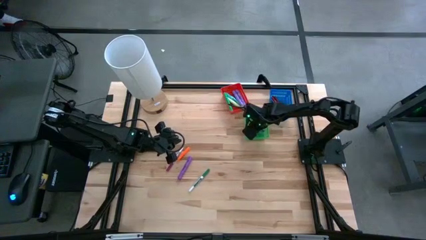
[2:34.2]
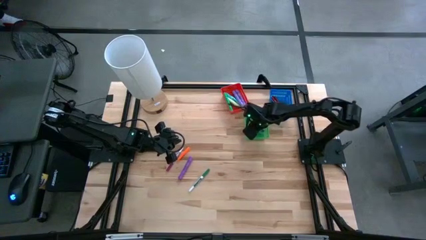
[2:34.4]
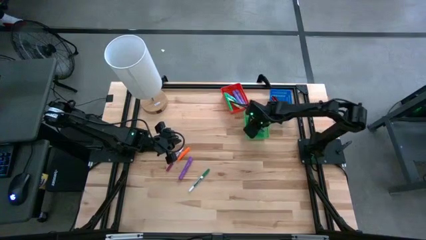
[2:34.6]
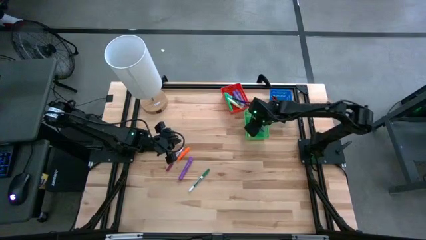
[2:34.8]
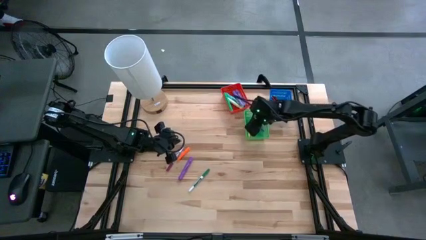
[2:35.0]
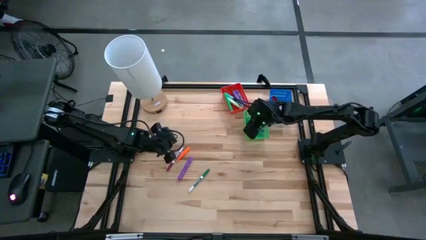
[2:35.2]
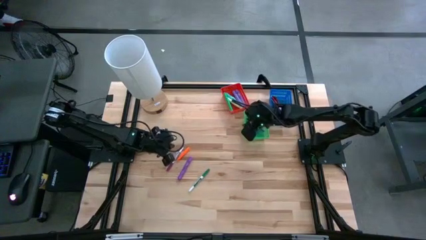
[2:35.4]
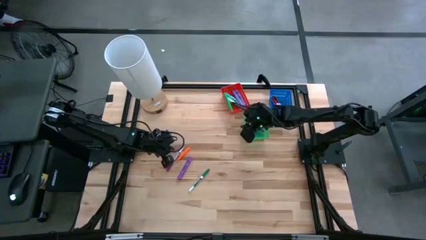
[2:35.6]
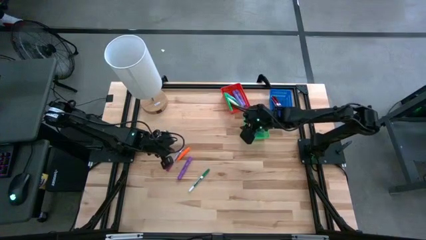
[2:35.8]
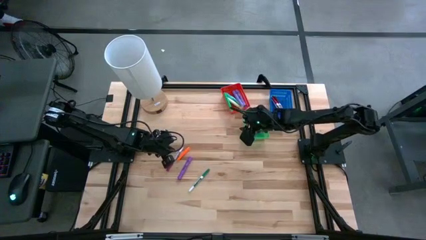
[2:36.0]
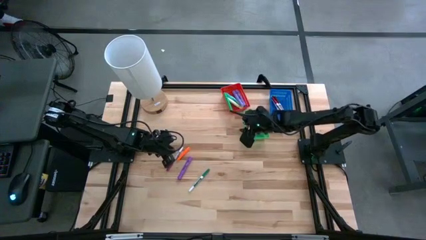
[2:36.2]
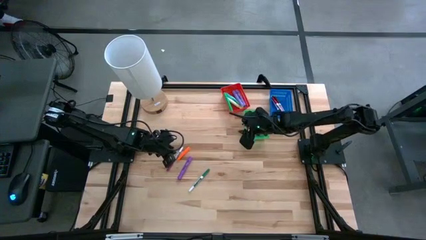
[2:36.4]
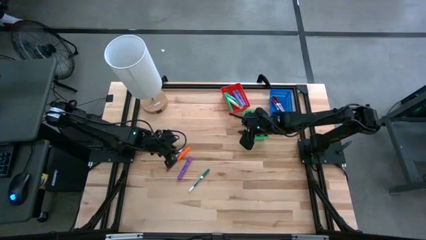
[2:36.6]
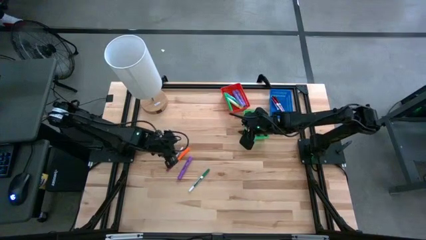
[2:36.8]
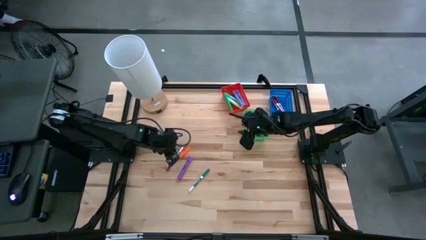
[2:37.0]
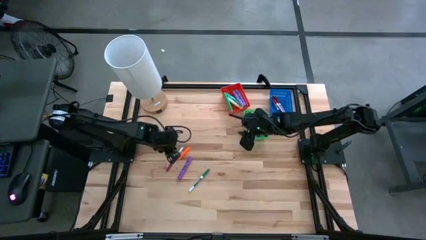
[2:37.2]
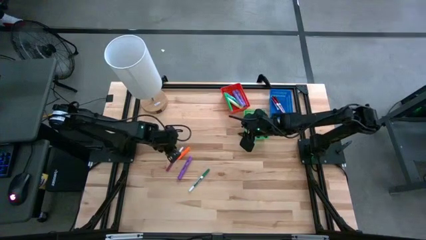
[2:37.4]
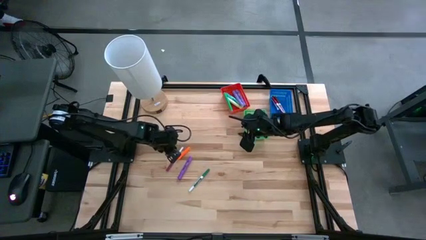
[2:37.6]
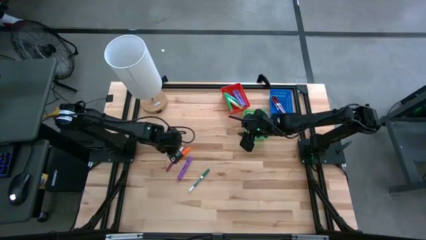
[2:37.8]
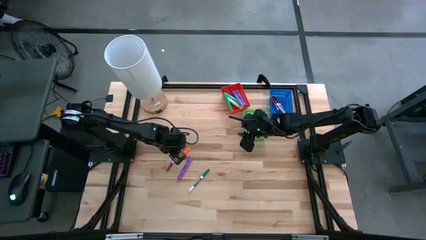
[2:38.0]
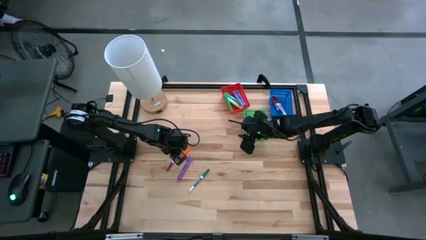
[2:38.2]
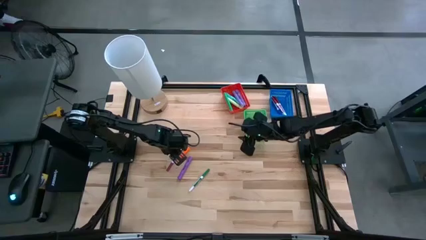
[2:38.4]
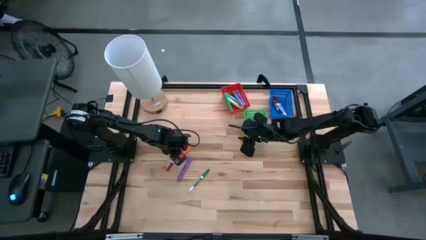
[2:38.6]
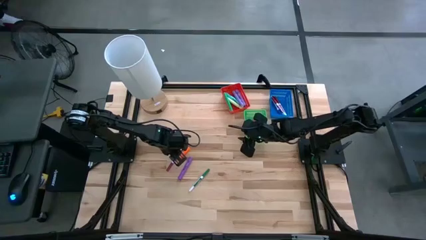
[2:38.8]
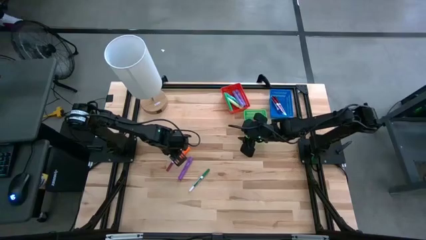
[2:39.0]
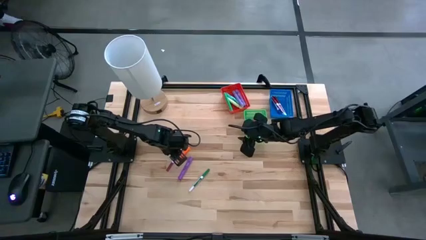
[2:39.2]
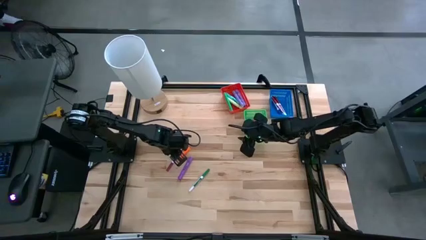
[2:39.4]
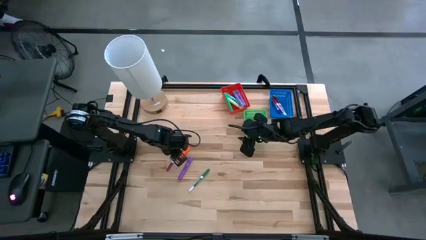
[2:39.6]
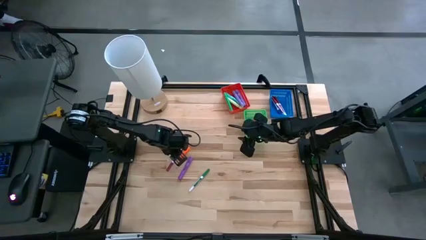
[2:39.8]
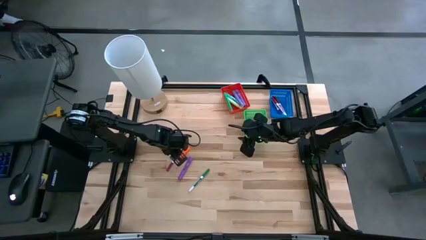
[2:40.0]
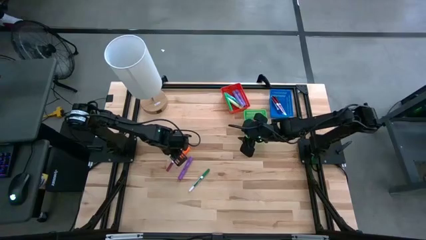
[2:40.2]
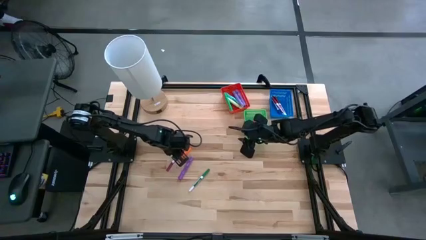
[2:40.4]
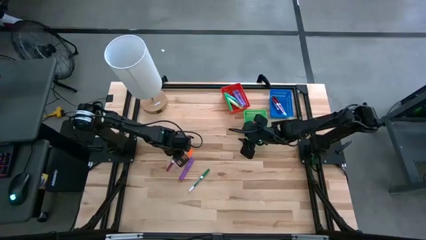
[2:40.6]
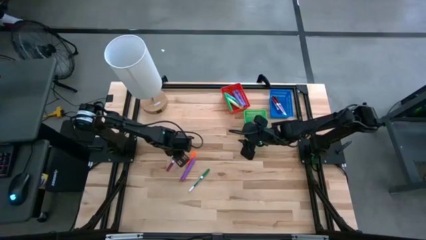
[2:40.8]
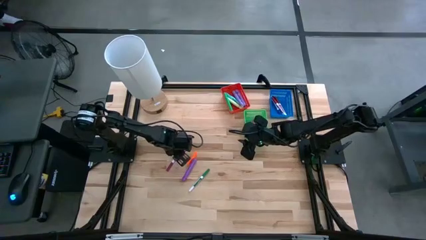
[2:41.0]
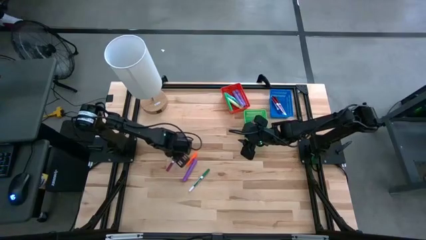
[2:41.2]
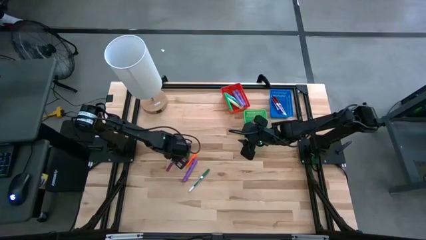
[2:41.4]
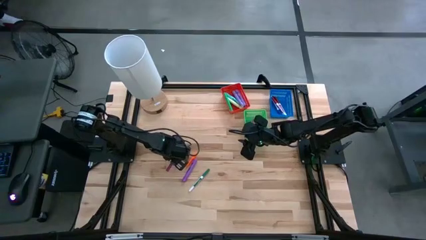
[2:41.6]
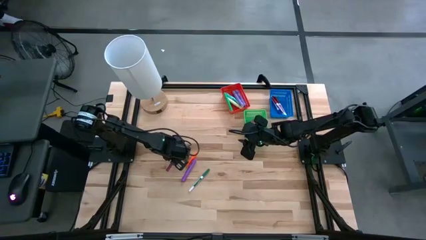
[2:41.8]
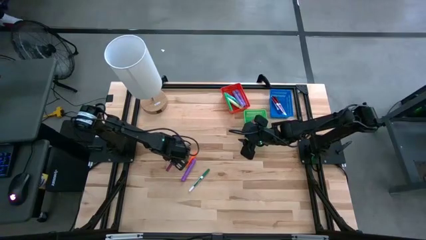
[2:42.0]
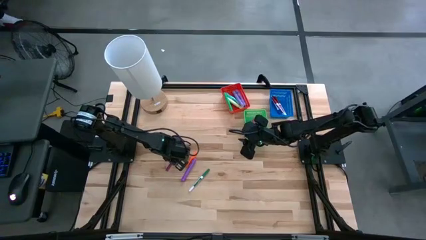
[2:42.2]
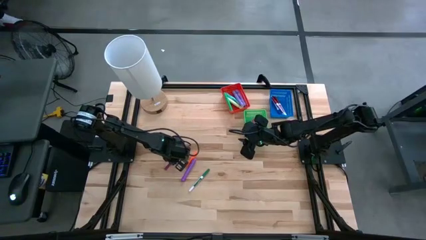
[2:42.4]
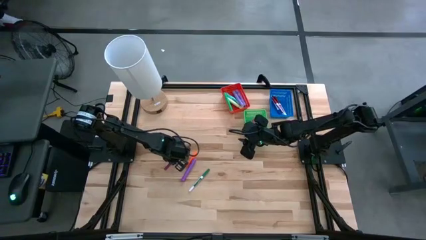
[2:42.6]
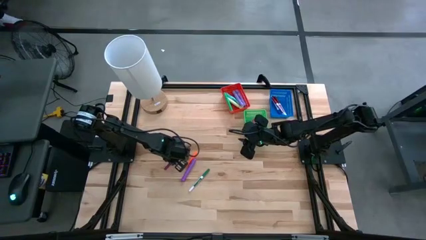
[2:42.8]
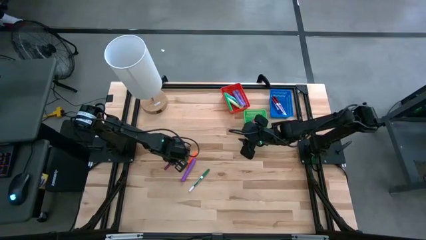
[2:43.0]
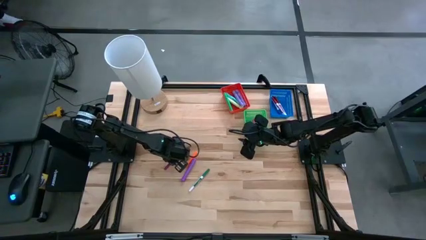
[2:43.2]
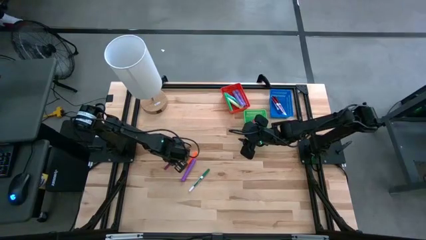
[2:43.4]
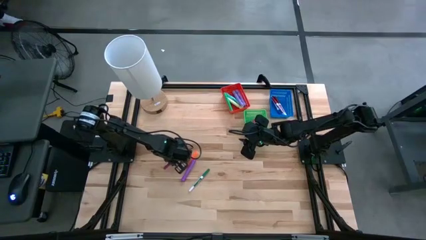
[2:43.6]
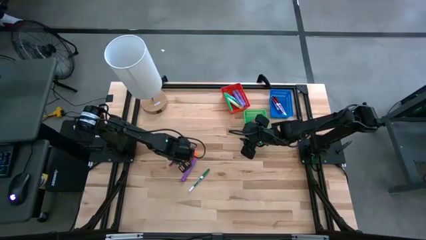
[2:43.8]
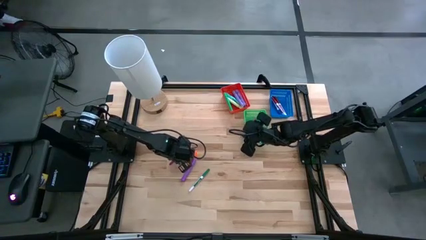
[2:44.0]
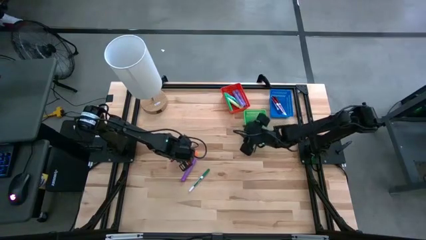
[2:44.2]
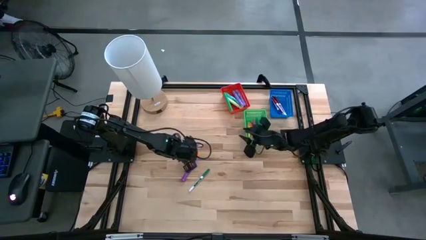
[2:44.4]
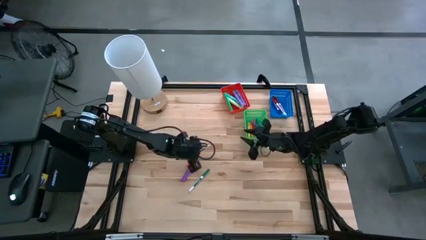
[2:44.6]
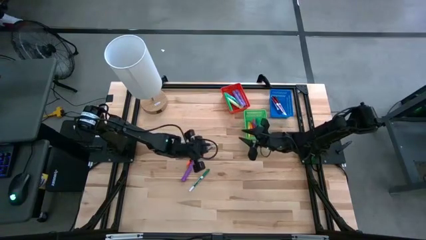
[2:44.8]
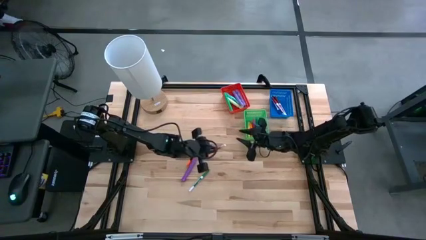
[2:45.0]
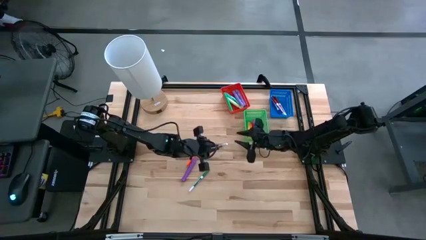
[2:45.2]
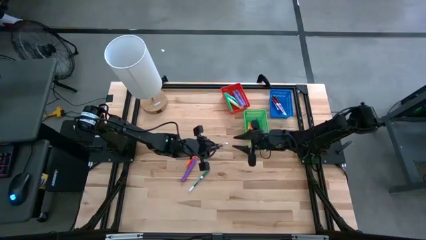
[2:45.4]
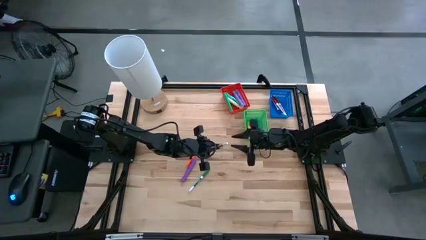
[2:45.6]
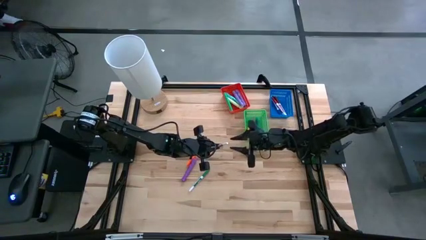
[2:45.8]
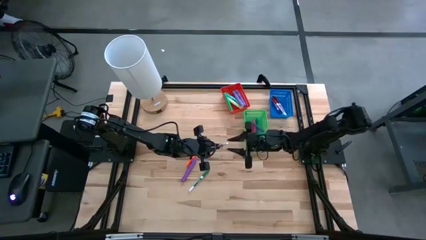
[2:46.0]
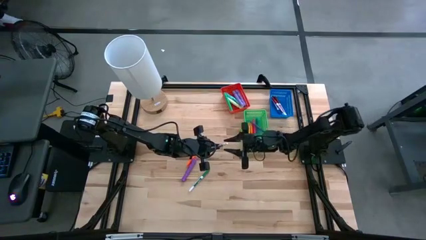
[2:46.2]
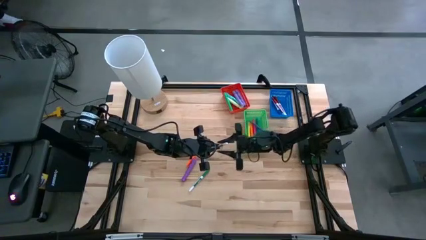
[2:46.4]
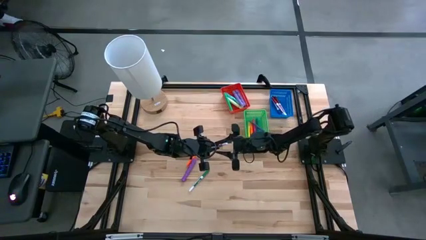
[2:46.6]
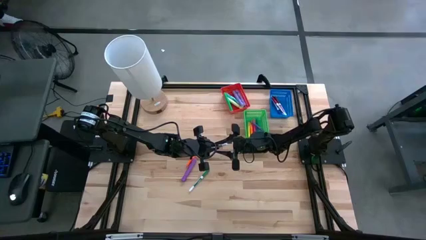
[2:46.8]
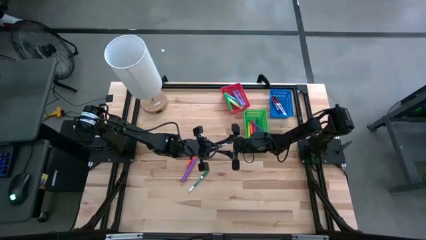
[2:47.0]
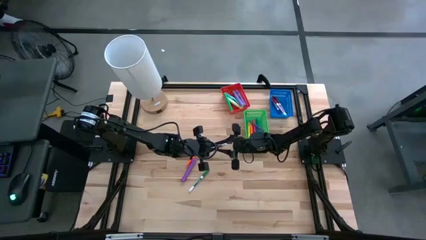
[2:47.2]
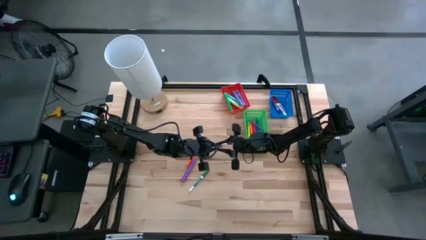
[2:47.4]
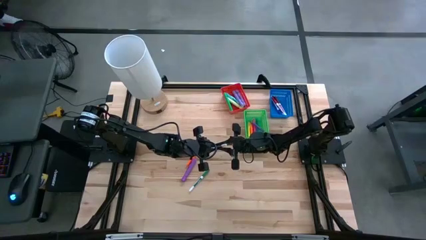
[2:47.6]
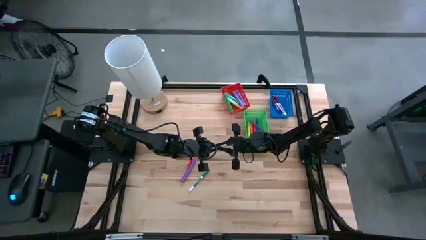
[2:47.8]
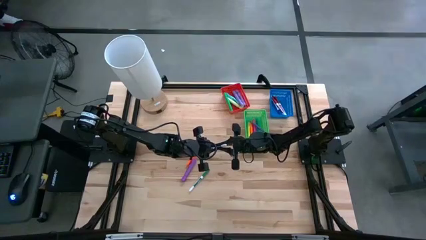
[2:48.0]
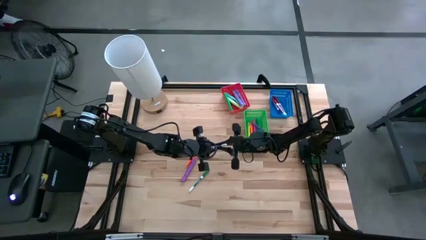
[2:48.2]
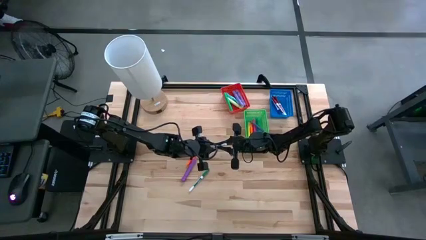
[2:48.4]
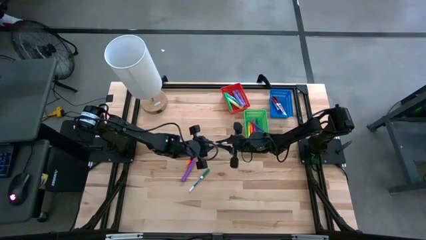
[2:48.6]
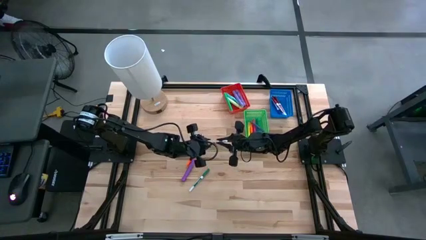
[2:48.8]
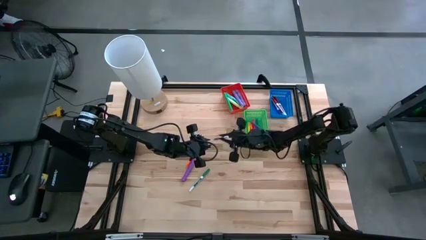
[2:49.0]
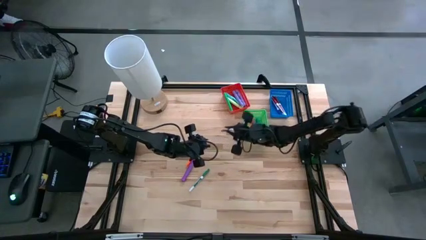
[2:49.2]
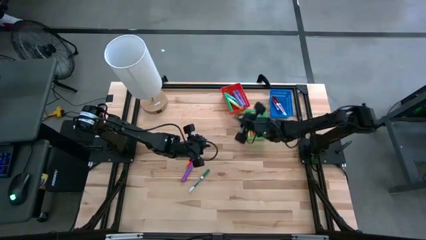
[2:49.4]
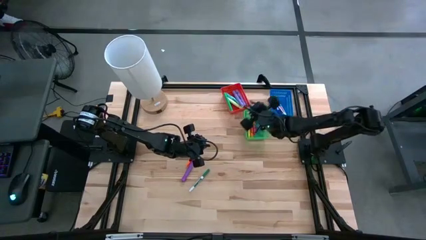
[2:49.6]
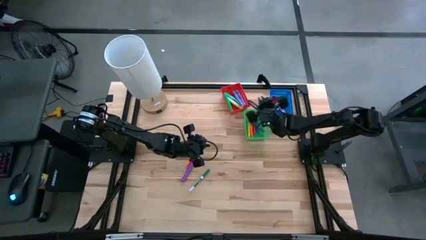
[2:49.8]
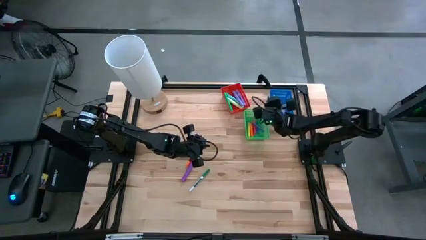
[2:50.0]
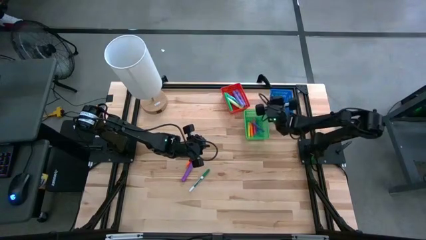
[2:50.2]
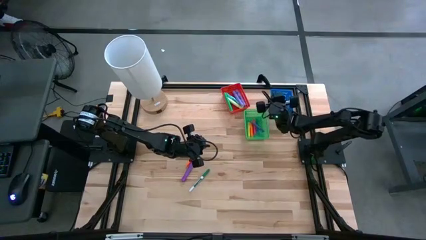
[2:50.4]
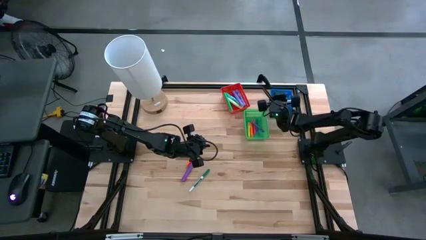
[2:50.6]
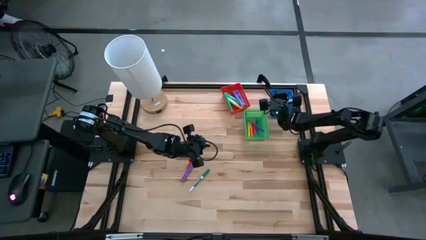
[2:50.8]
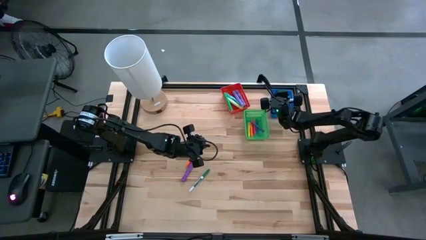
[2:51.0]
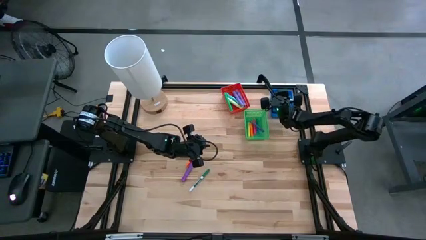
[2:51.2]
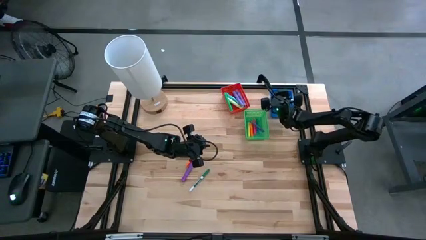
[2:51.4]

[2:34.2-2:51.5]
Task: Pick & Place Markers
Put the dark purple marker in the blue bin
